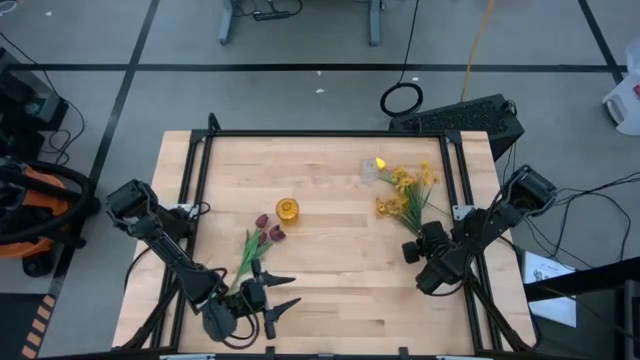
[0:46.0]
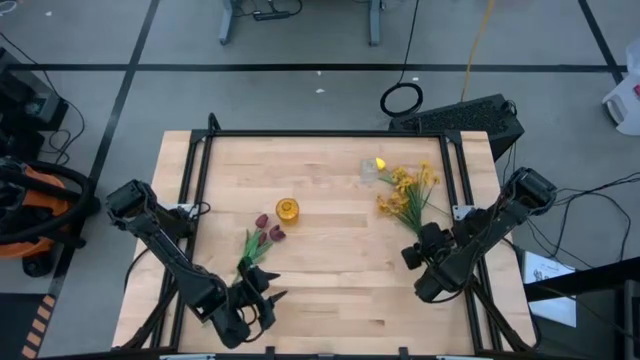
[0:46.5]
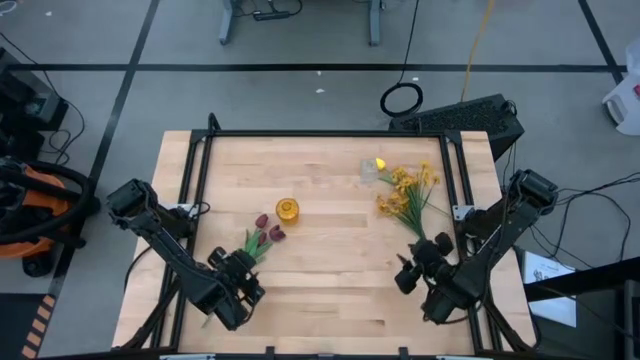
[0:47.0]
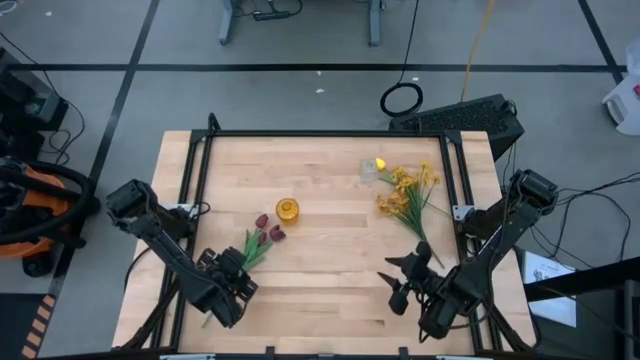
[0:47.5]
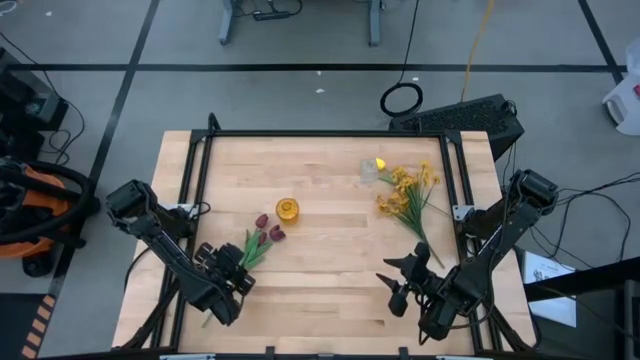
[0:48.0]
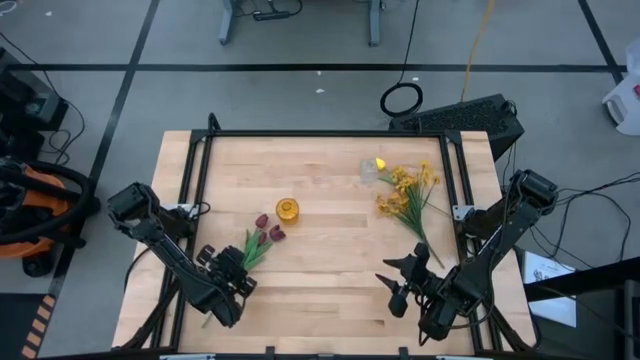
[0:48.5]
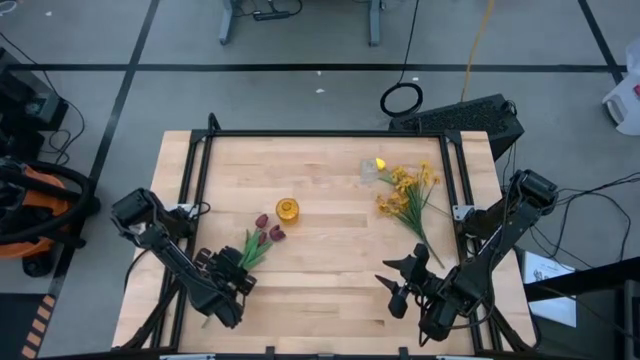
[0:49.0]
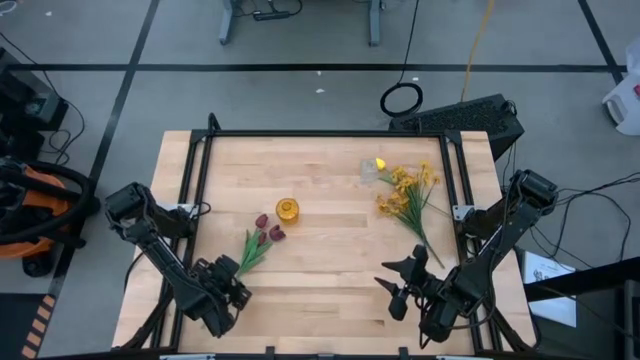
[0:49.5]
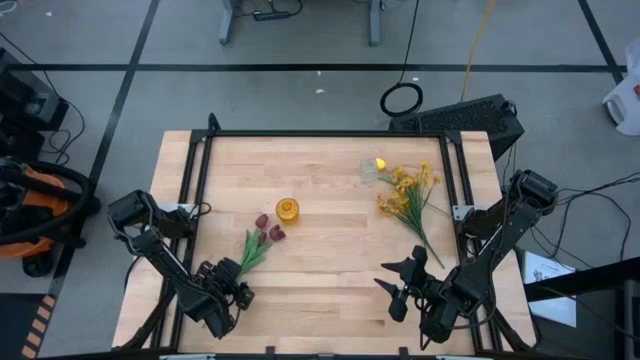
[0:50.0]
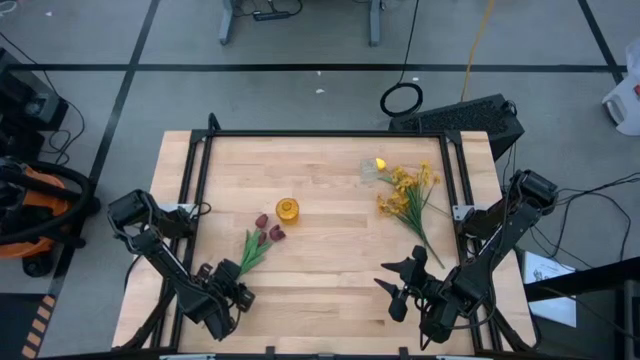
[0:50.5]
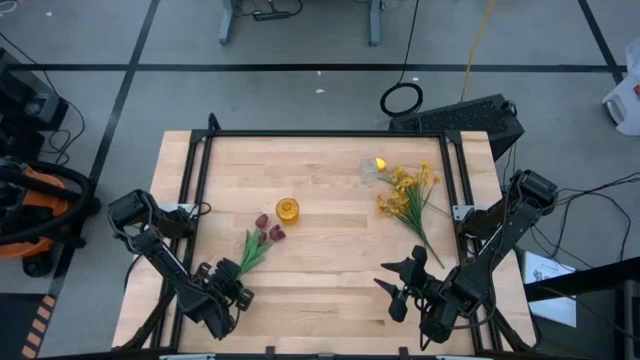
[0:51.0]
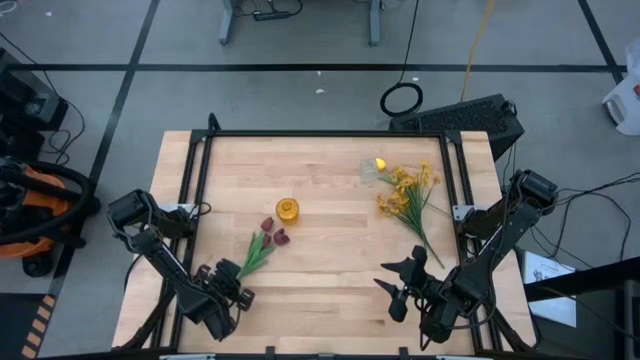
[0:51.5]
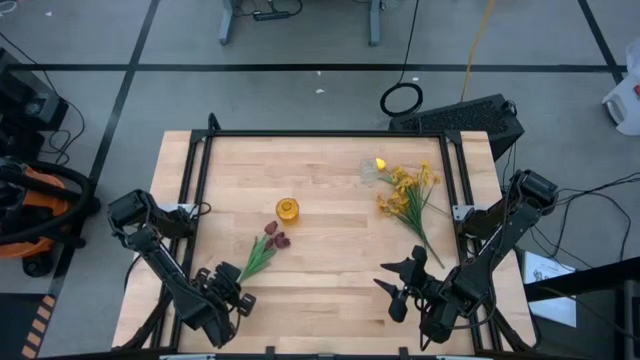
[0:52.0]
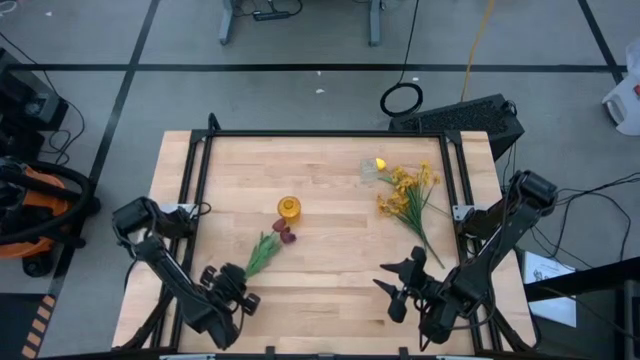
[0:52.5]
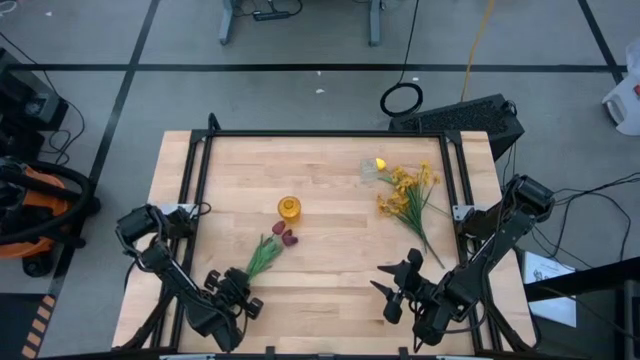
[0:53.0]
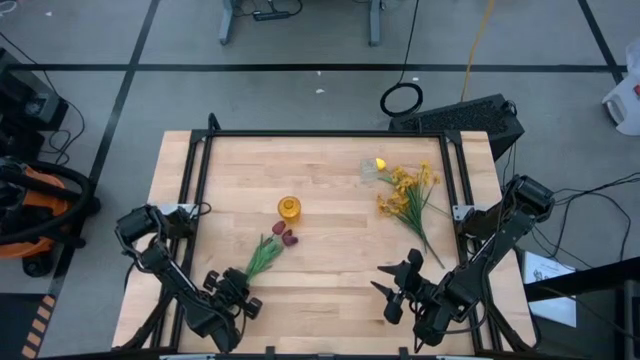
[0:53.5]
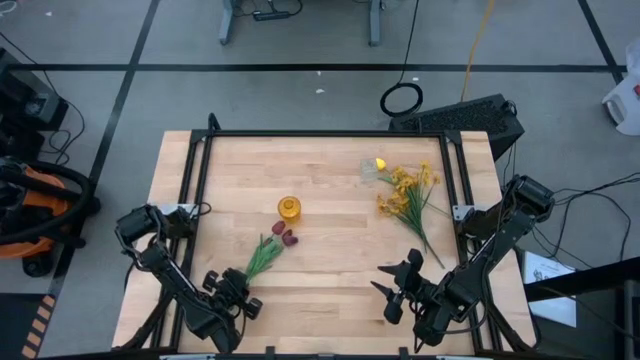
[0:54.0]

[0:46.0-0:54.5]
Task: Sort flowers into vase by color
Put the violet tulip into the yellow vase

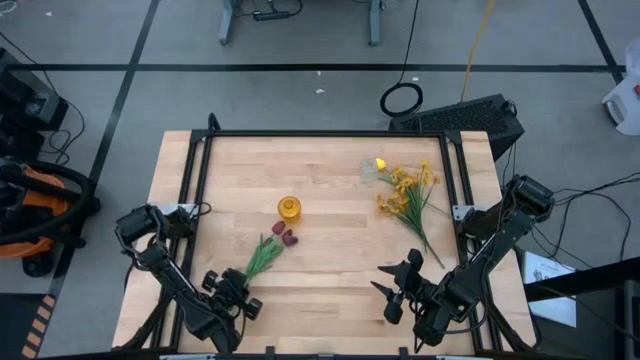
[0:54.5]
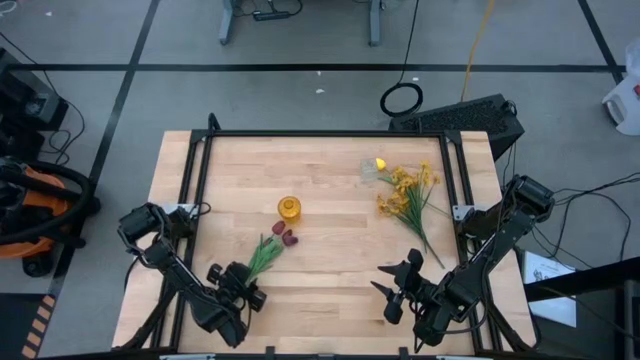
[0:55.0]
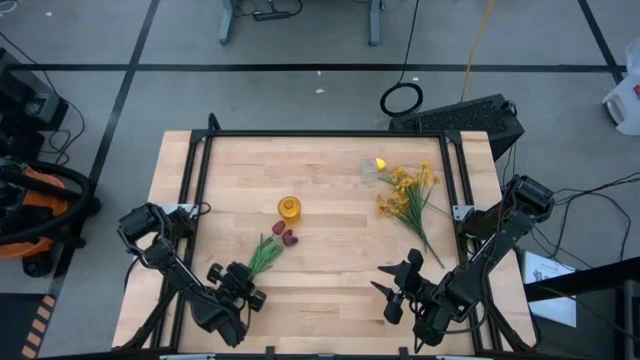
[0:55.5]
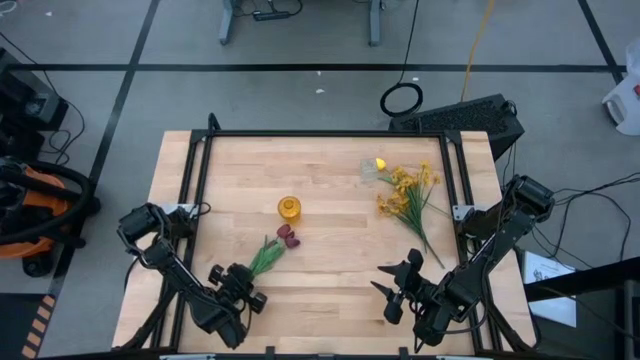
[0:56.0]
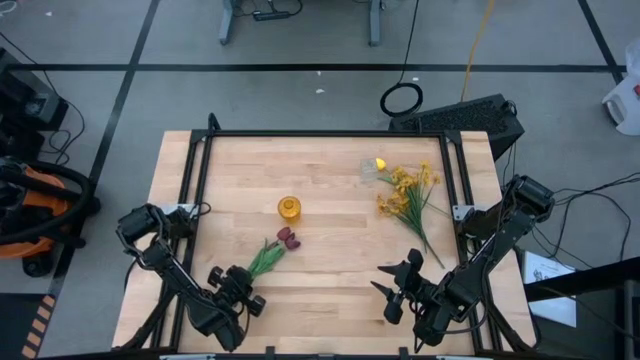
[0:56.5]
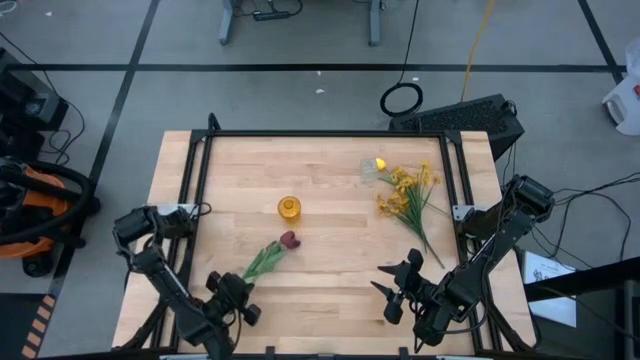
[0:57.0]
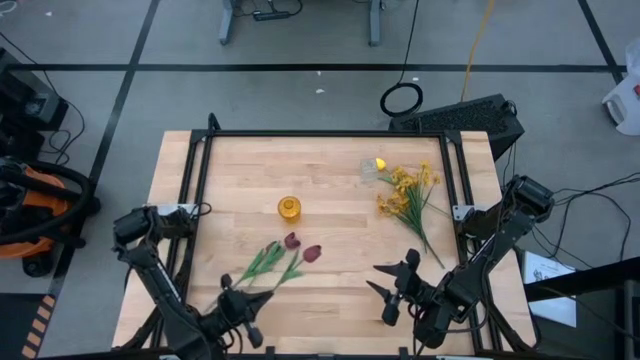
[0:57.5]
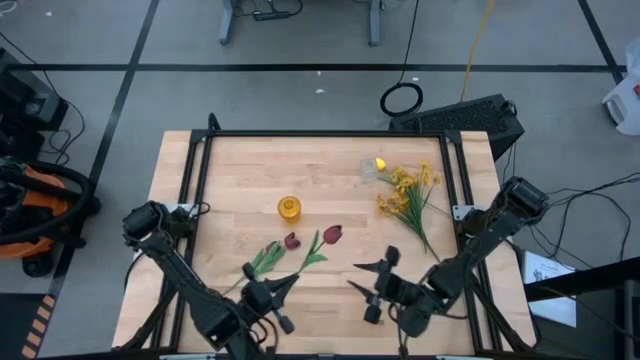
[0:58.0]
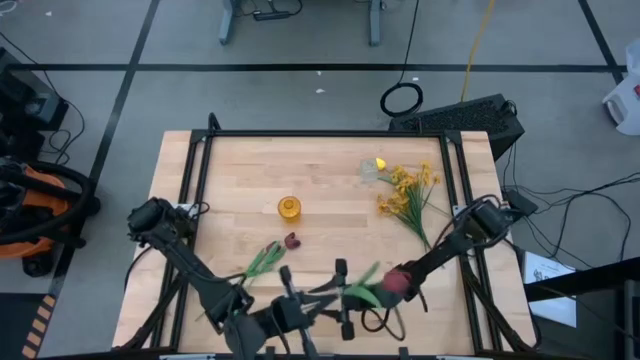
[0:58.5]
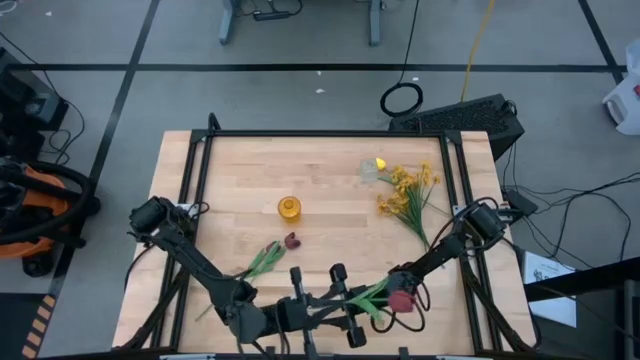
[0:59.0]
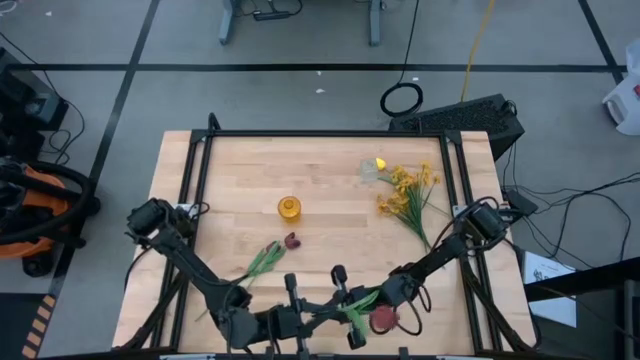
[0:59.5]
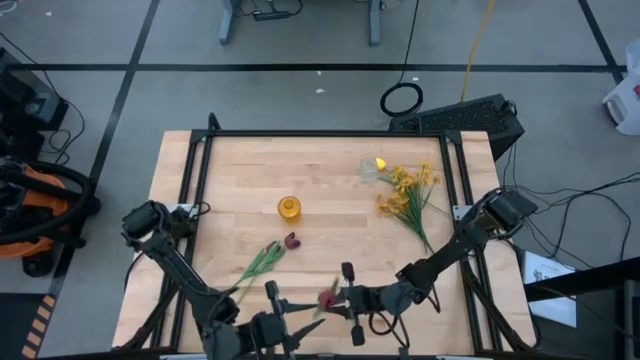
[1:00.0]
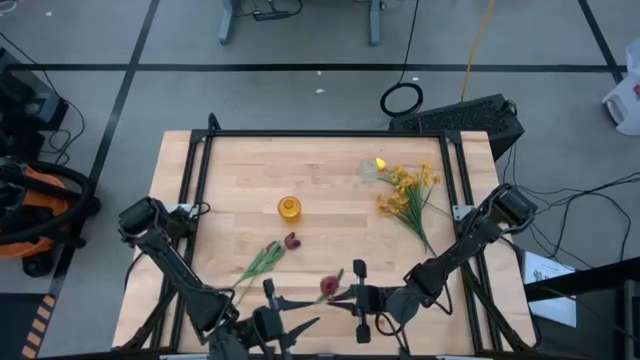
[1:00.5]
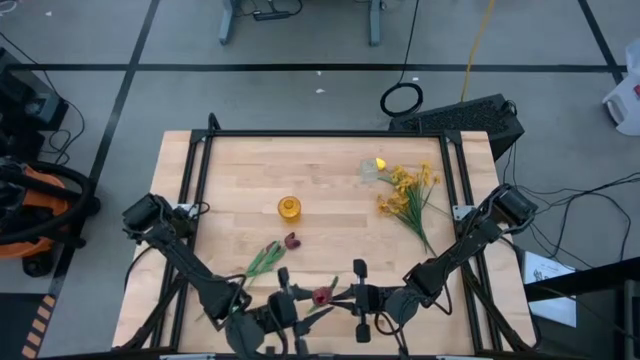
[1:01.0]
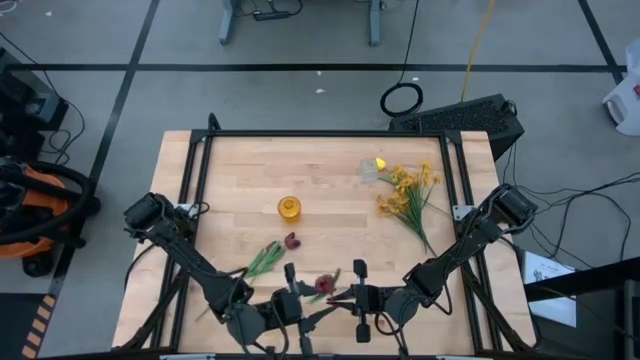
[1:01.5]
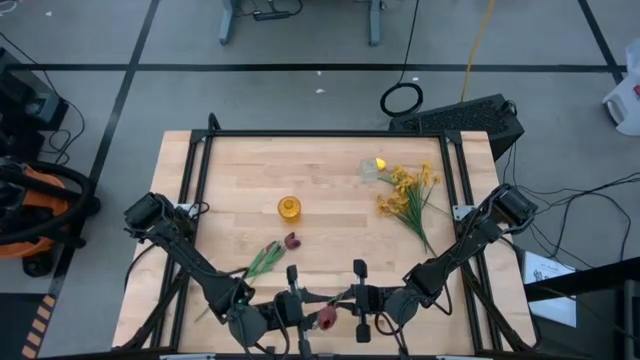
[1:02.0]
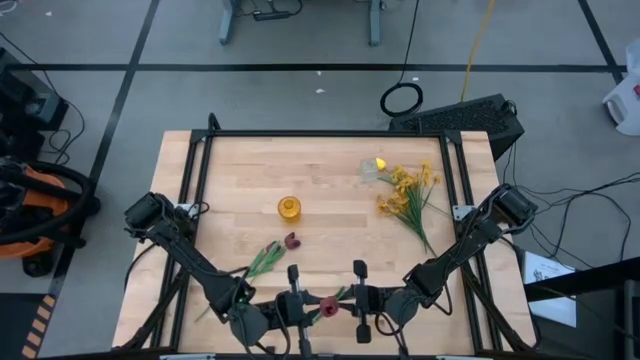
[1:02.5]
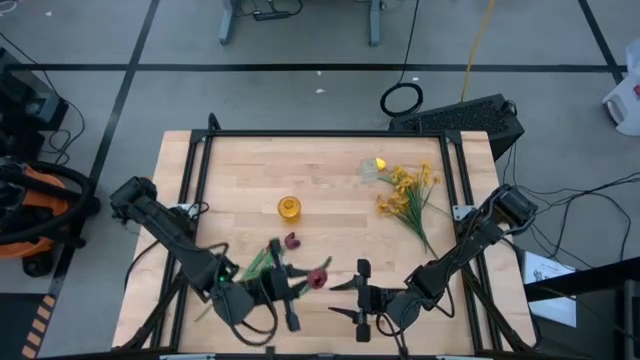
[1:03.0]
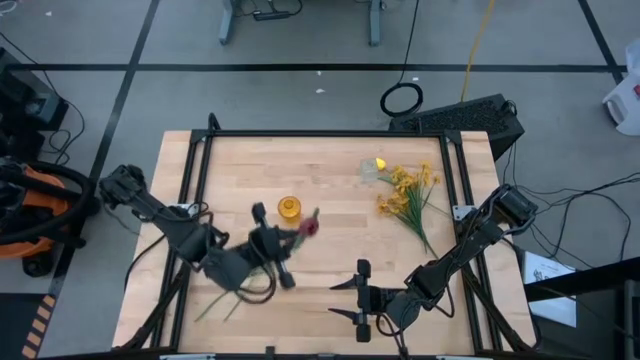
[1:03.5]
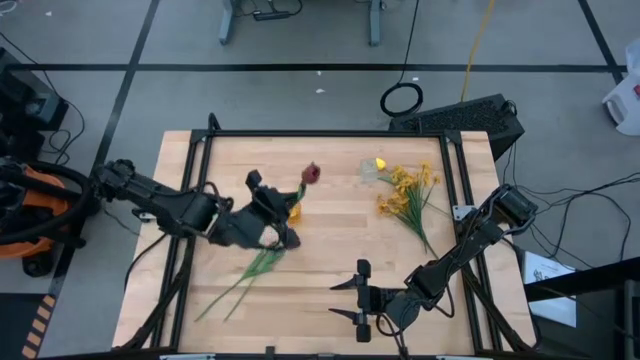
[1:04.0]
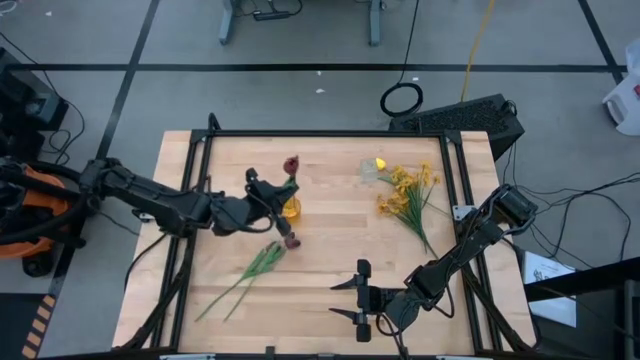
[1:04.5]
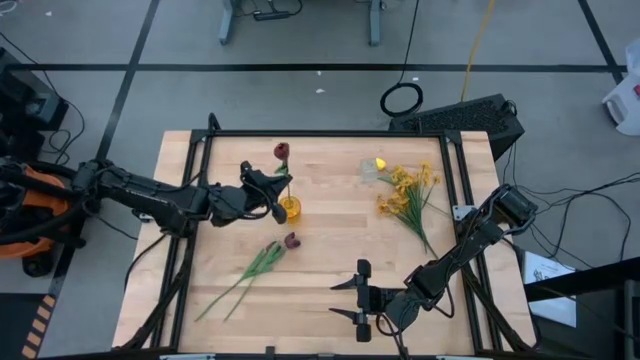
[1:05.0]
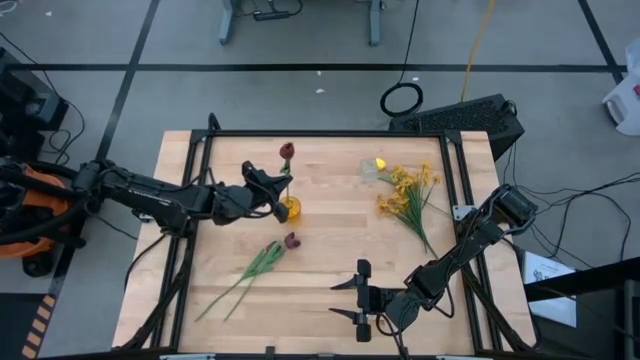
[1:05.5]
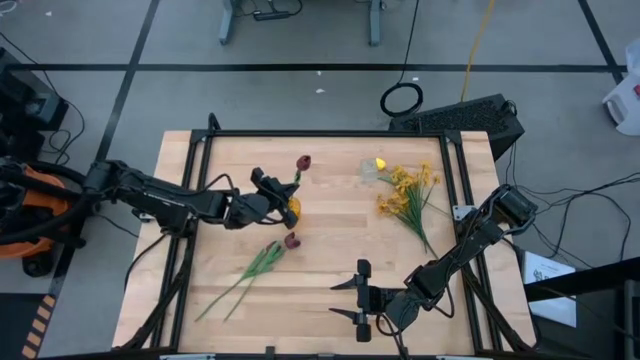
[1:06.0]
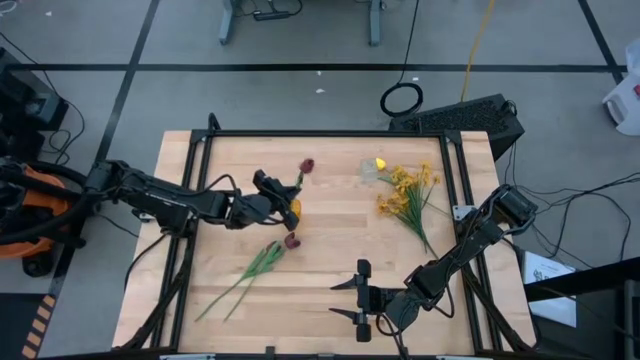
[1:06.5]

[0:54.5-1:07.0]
Put the violet tulip into the yellow vase
